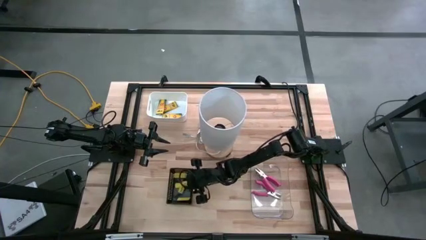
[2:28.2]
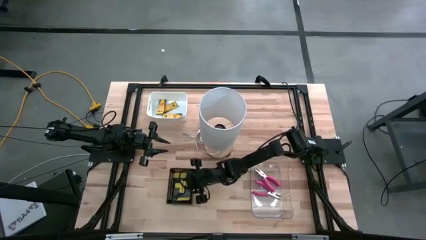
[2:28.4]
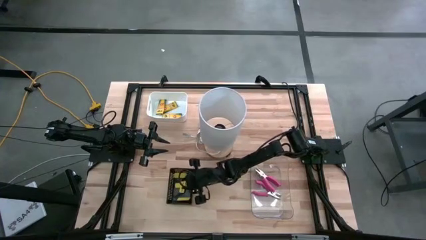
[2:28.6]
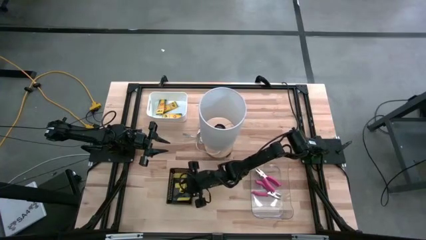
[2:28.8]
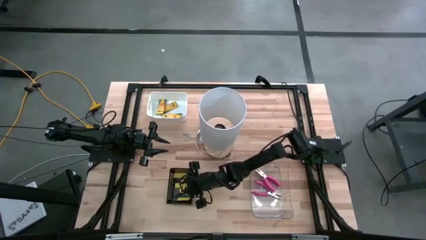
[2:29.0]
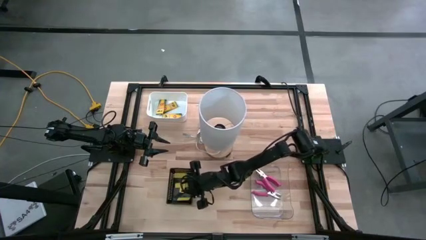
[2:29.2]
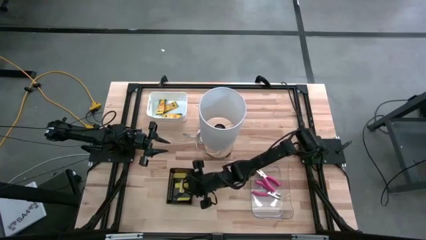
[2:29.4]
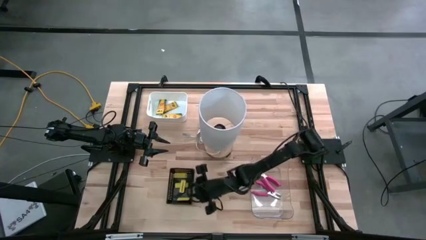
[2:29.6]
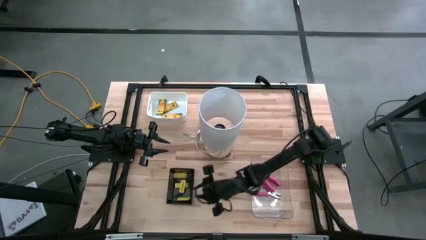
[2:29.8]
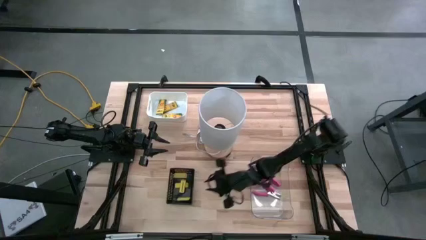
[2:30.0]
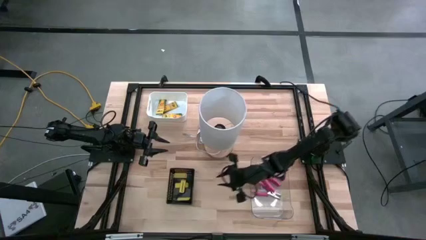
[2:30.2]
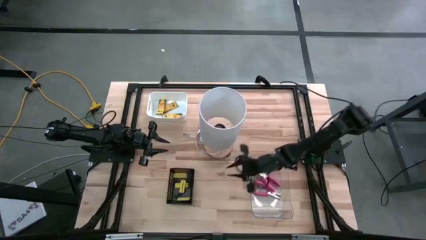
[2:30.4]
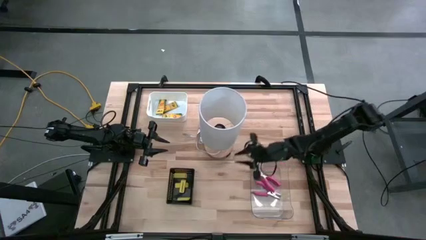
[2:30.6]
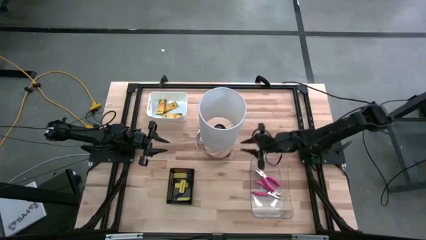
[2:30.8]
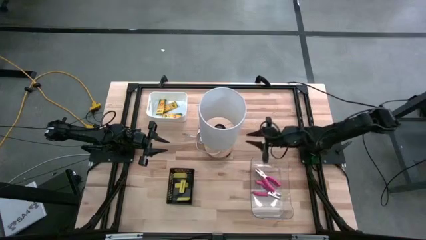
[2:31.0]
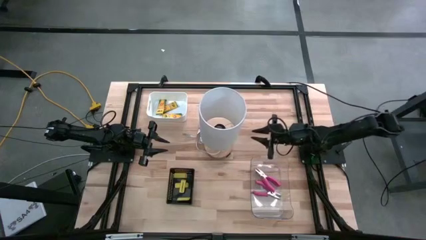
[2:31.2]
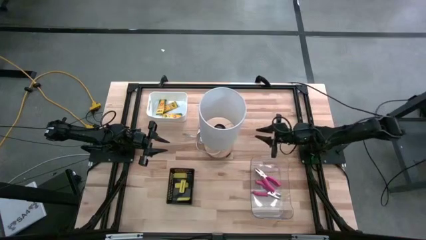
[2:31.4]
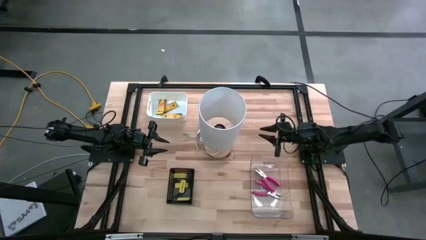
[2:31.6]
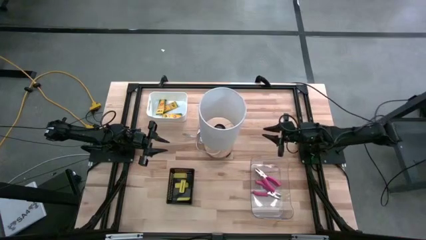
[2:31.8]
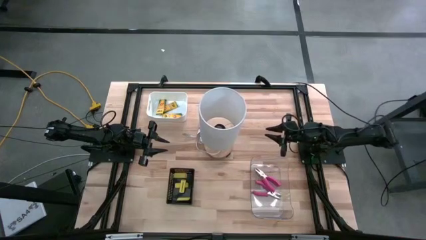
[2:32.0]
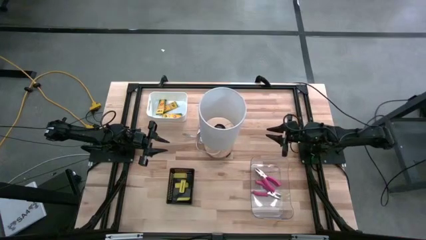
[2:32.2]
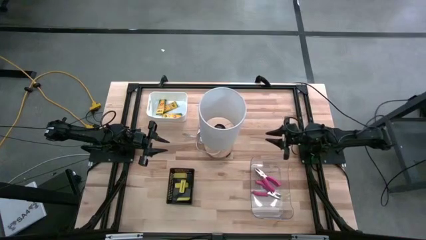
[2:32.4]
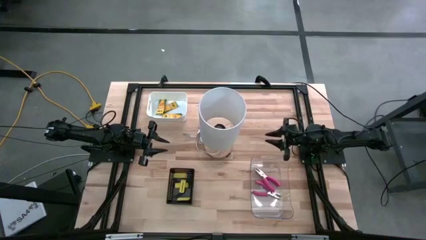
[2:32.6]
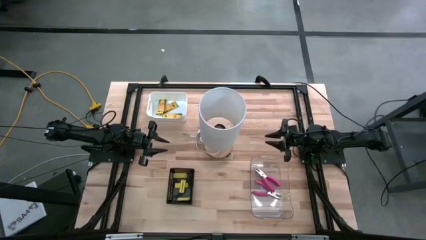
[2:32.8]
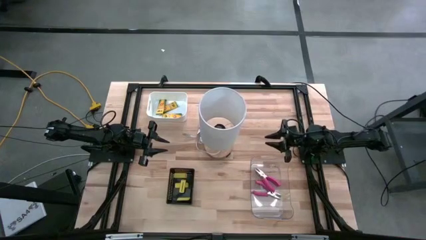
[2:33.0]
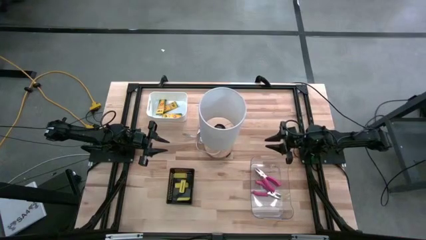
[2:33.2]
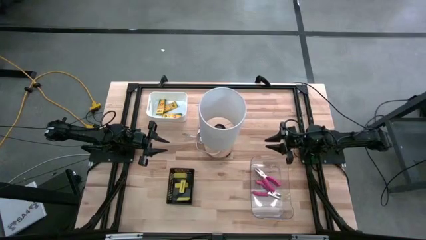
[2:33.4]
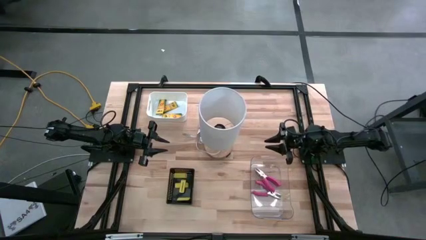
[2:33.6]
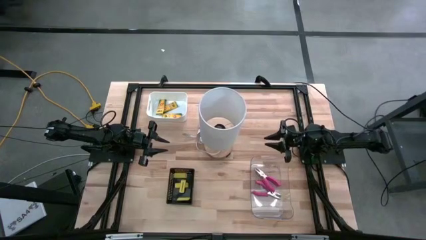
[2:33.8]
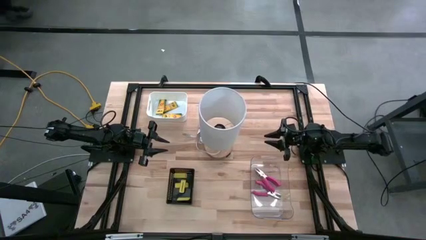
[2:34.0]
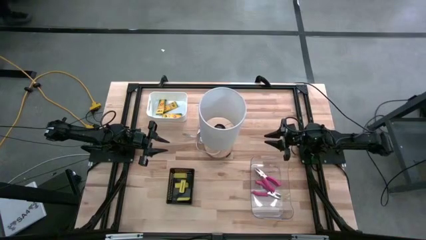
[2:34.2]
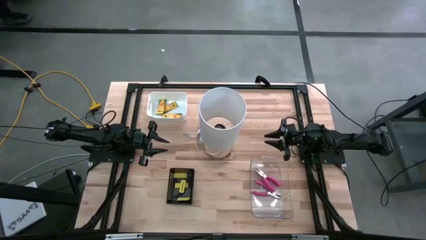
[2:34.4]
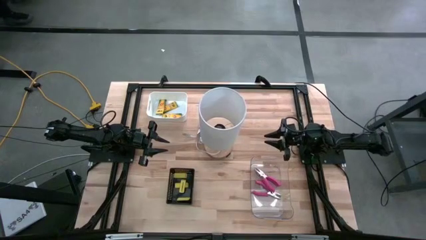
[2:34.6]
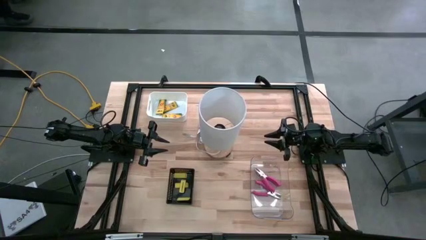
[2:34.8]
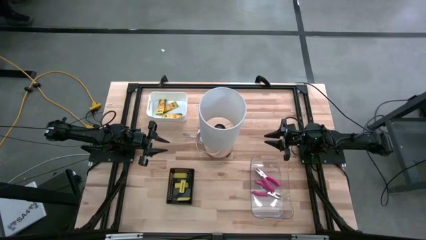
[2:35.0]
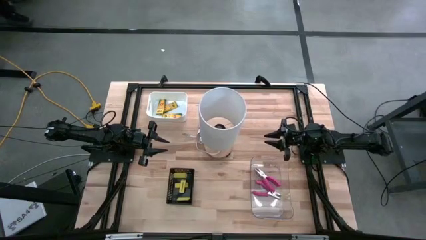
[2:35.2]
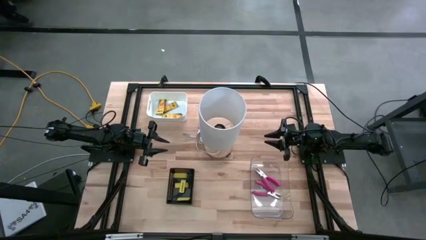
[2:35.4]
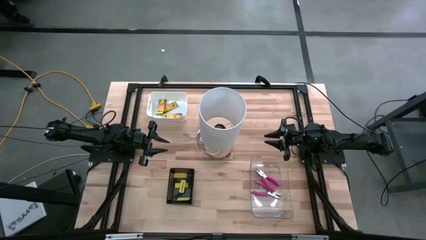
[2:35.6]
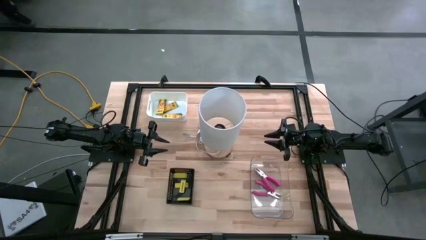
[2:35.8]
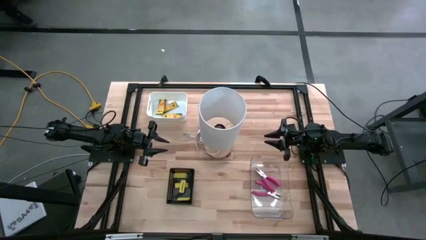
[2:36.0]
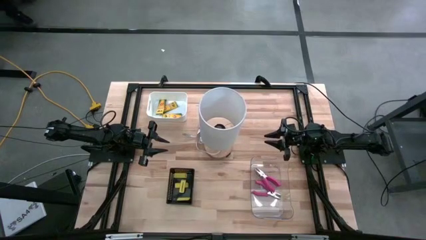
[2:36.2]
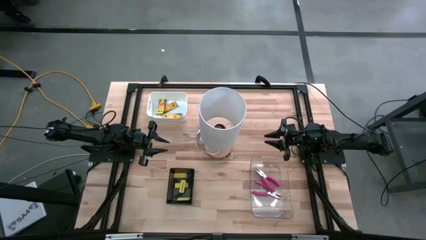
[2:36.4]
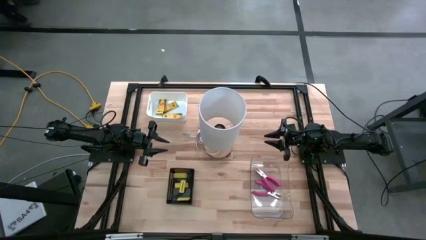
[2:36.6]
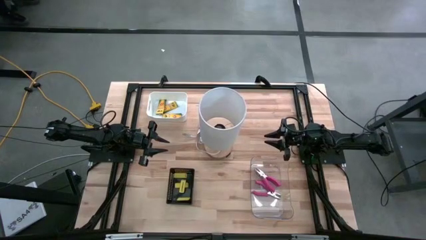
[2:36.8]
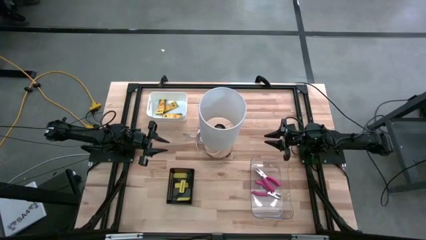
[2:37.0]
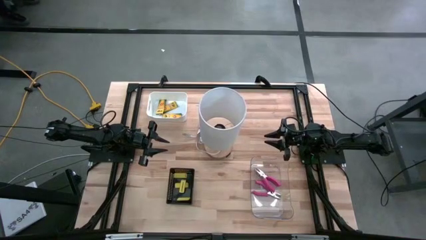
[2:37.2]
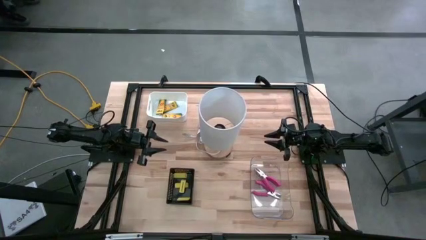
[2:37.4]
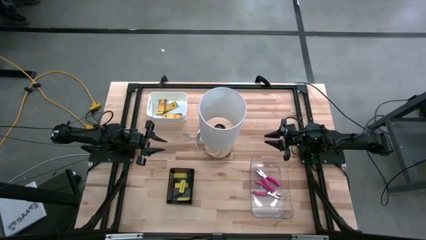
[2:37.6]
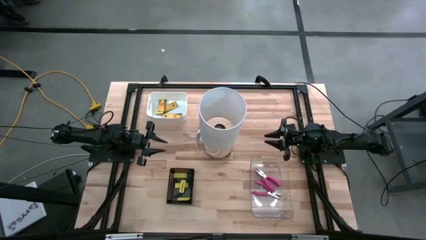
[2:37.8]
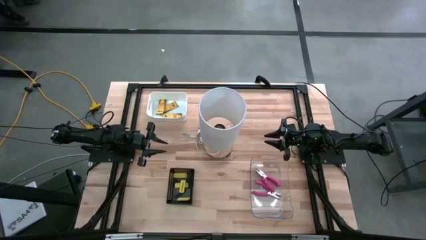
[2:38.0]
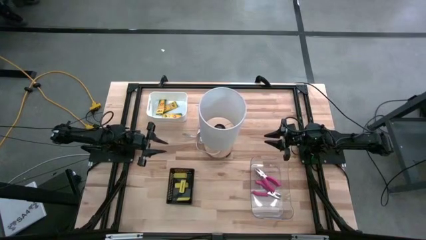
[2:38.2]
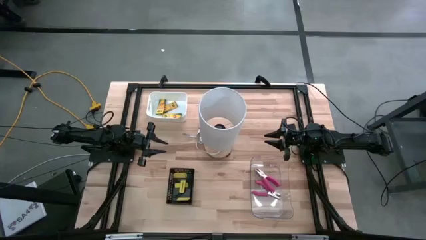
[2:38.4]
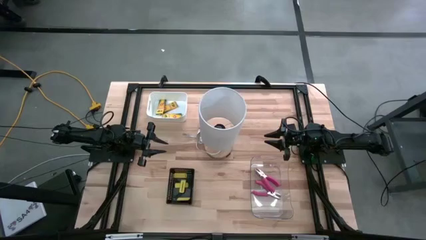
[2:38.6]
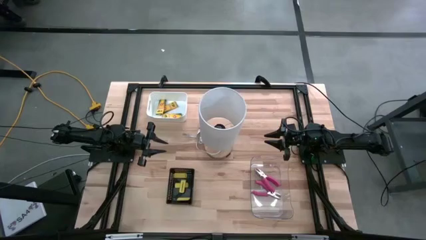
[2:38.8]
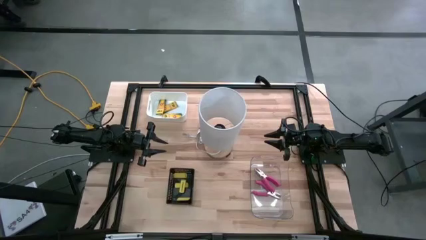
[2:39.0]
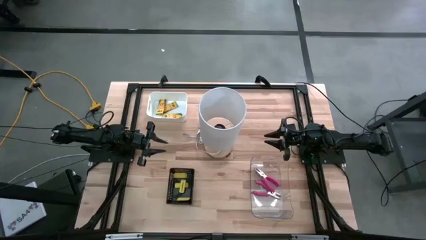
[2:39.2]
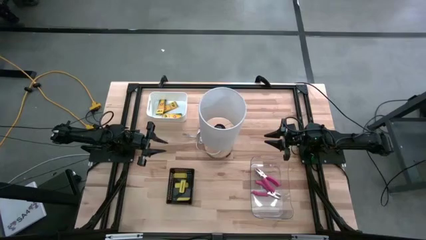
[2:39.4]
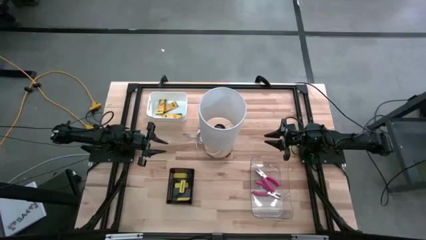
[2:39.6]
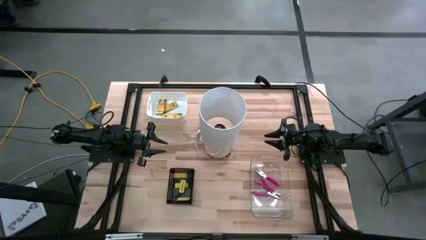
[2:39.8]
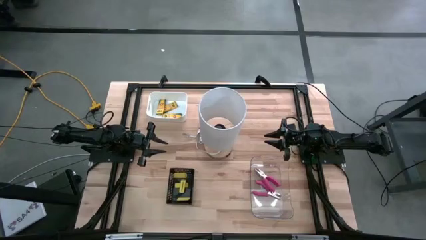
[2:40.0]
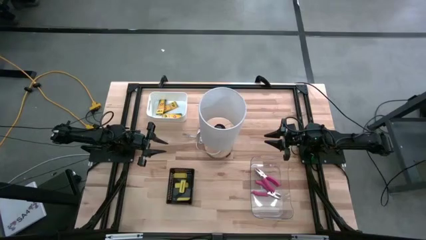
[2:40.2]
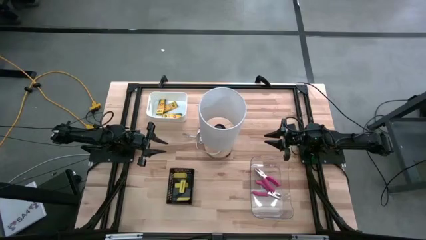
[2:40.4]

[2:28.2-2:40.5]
Task: Pick & Place School Supplies
Return to Home Position

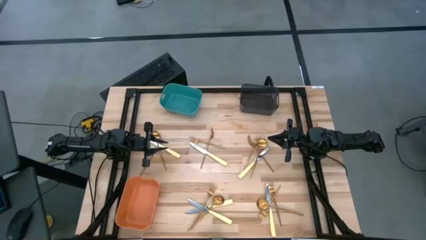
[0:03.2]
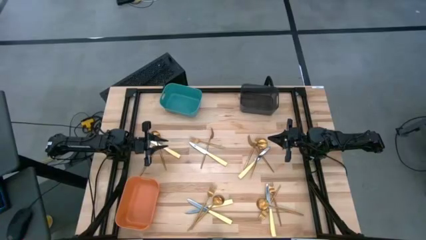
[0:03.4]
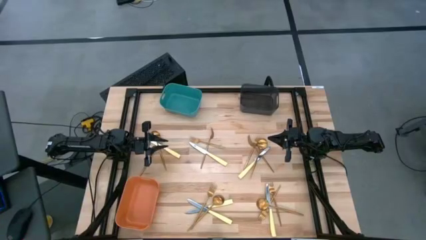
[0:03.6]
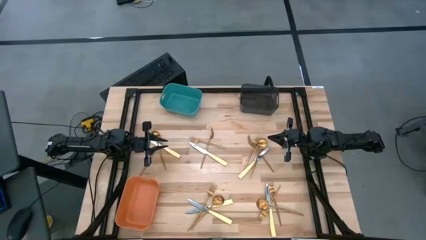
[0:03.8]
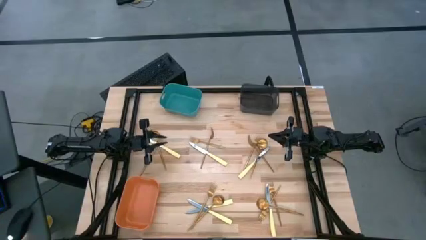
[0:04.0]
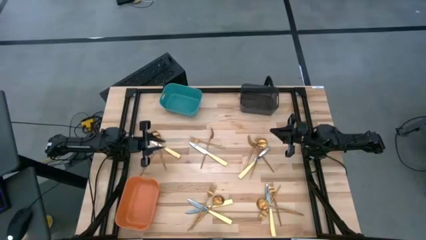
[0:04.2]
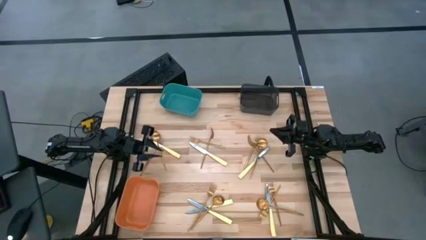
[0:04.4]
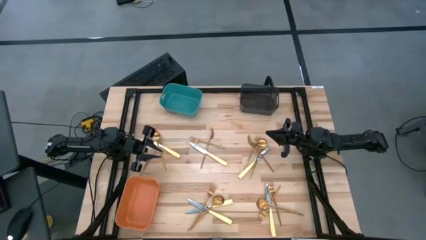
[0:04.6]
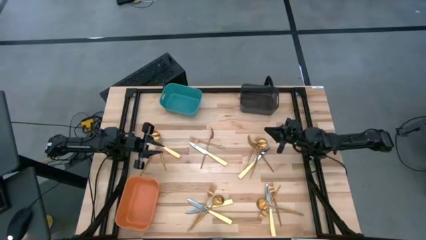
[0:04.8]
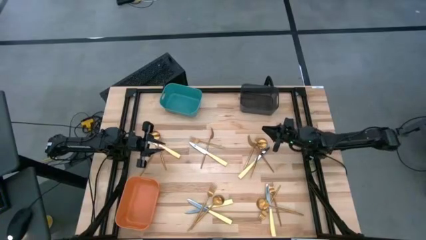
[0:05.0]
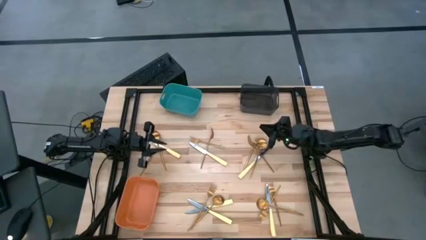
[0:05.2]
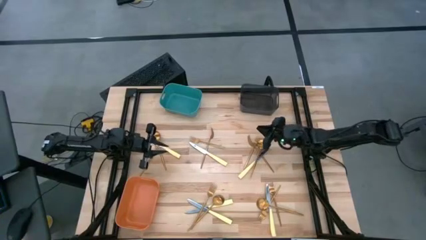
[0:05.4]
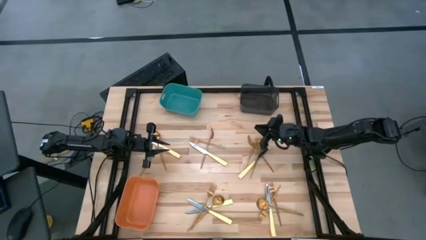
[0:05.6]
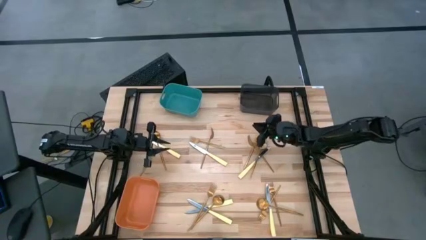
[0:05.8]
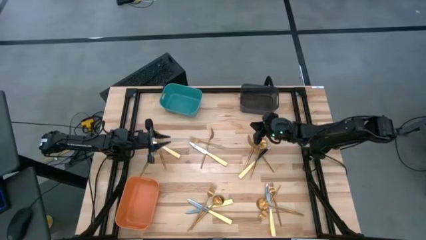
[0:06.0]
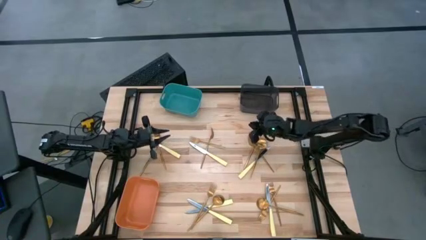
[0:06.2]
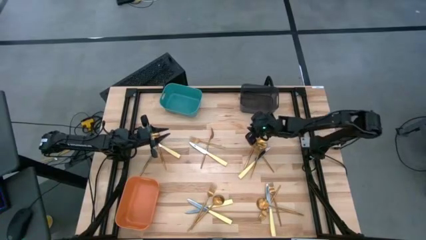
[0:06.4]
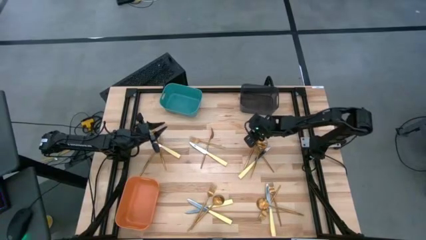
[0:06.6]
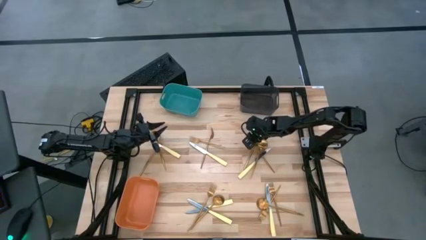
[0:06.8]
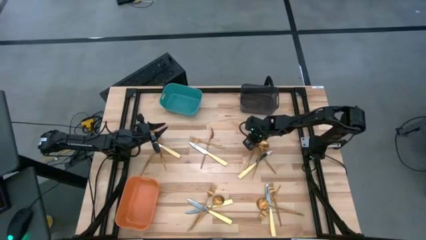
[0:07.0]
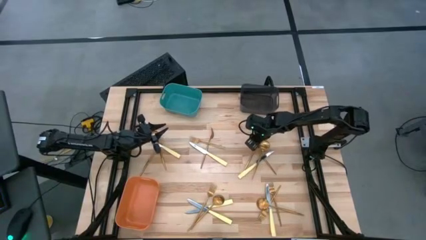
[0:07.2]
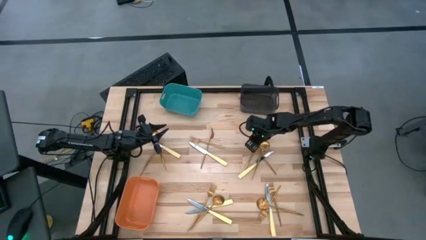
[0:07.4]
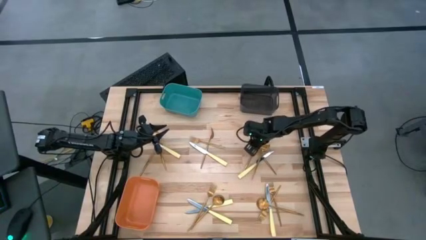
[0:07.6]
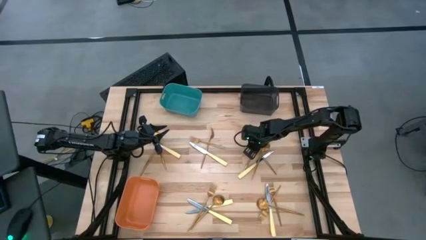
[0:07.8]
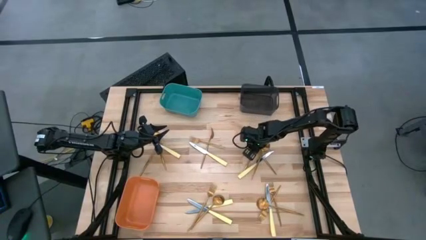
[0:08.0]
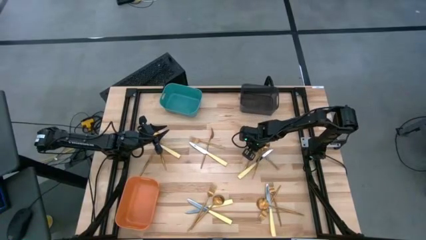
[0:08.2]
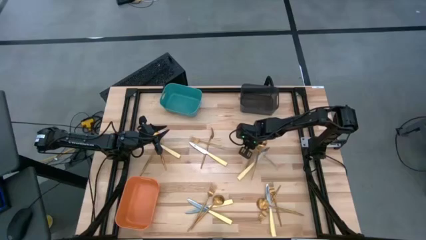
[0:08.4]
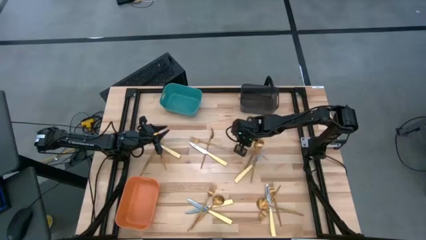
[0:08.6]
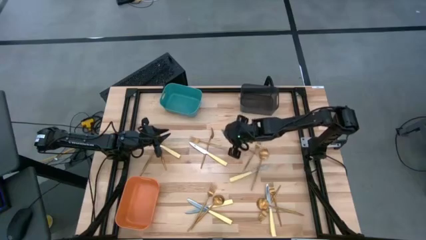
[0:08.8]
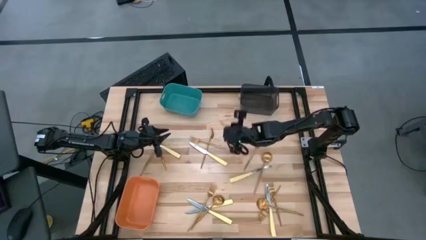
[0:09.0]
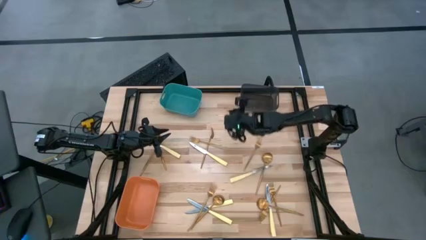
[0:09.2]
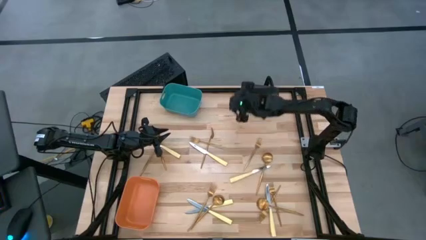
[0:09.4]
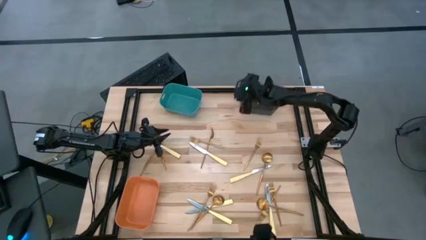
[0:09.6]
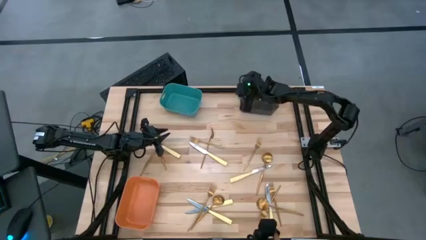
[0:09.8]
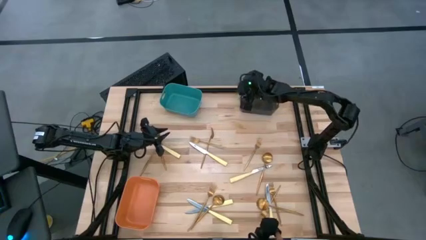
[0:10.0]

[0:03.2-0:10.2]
Task: Sort silverware by color (type)
Put the gold fork into the black bin
